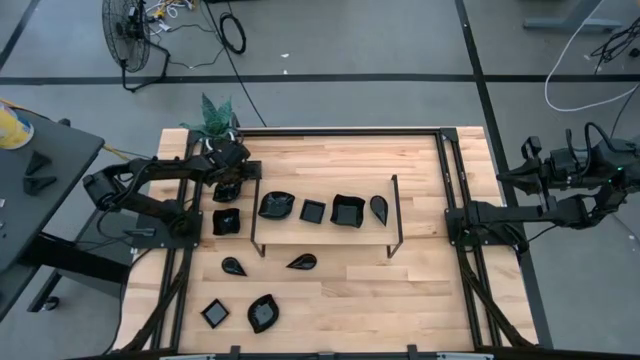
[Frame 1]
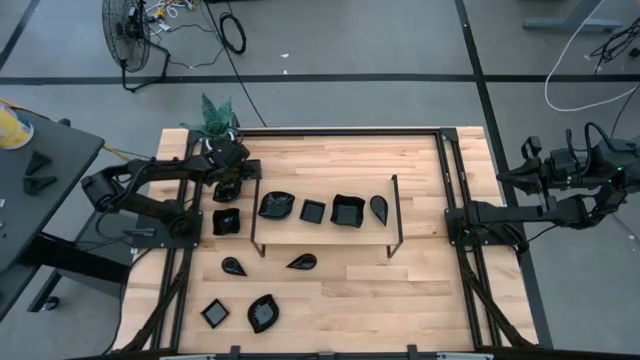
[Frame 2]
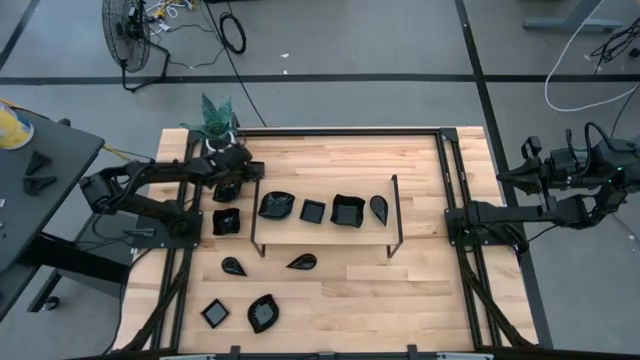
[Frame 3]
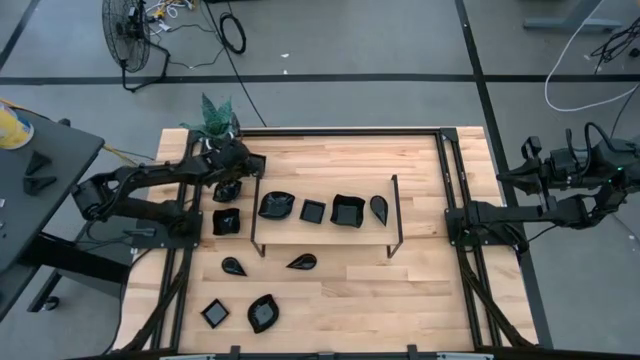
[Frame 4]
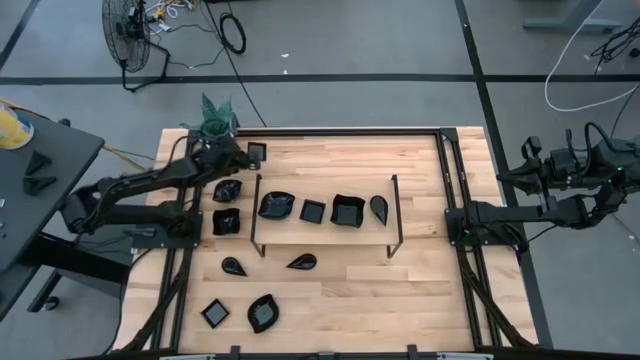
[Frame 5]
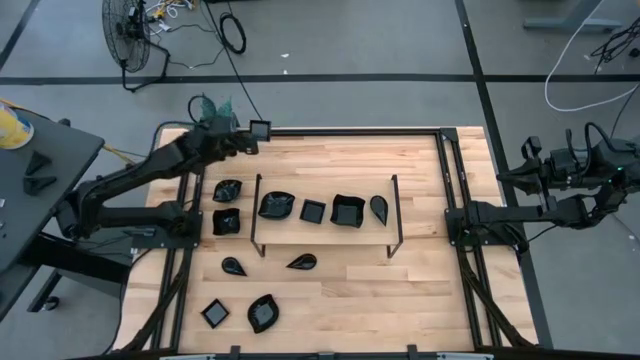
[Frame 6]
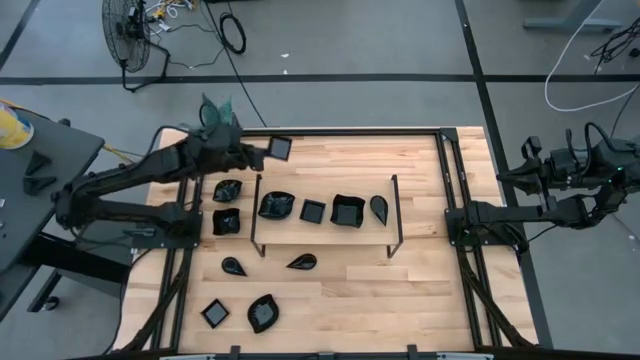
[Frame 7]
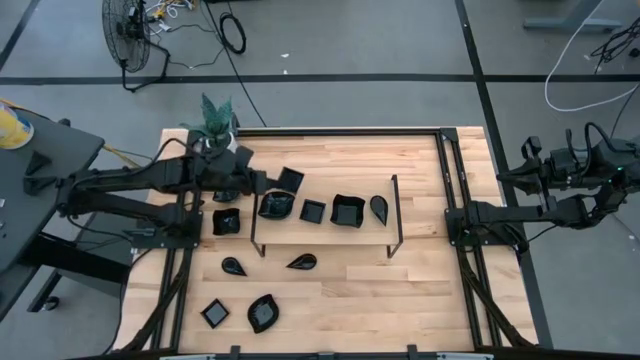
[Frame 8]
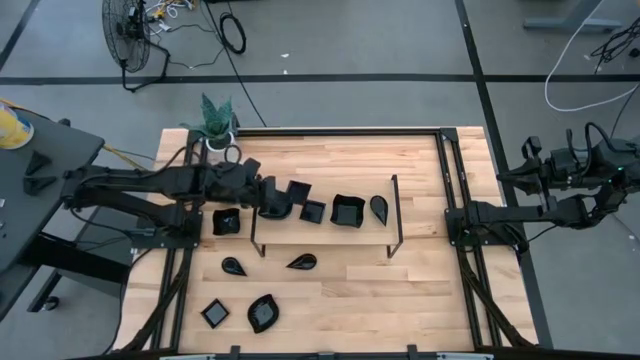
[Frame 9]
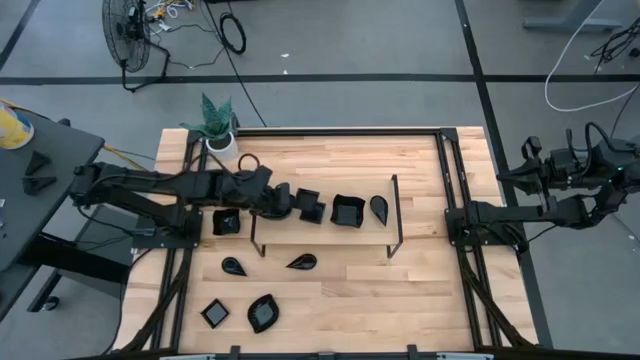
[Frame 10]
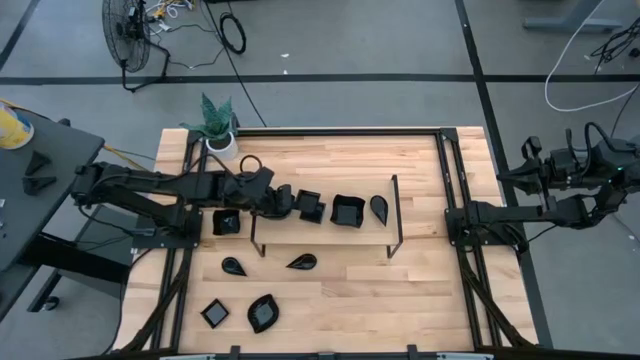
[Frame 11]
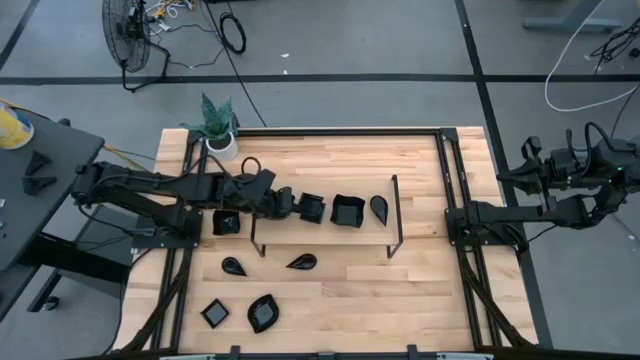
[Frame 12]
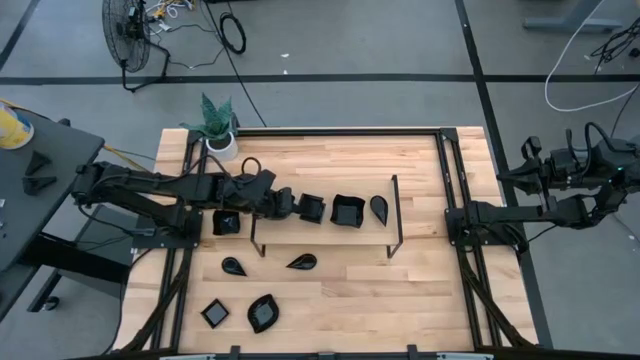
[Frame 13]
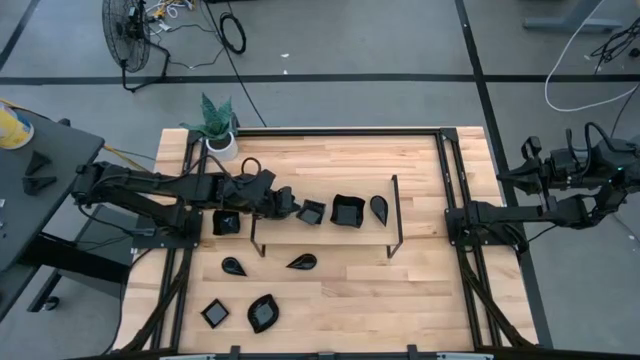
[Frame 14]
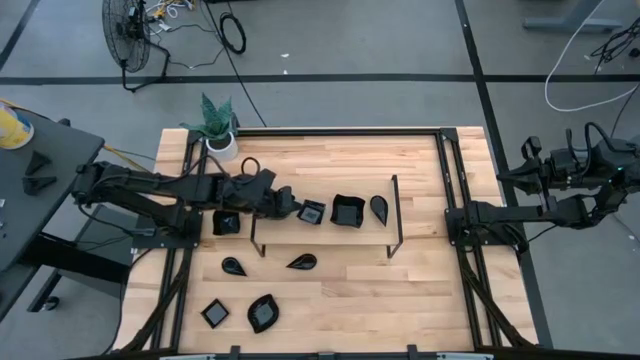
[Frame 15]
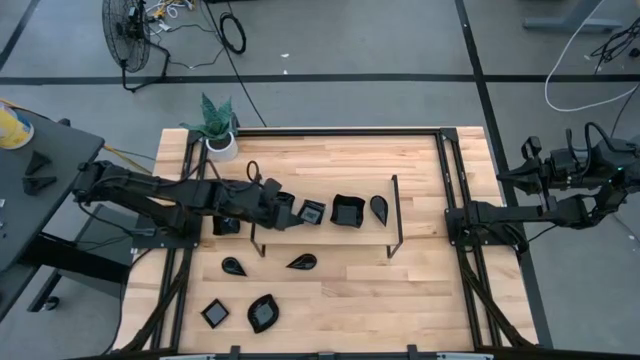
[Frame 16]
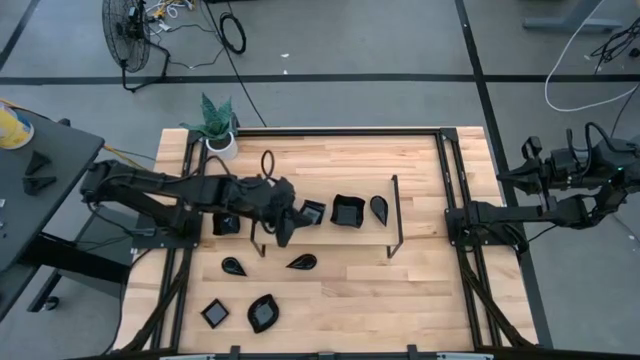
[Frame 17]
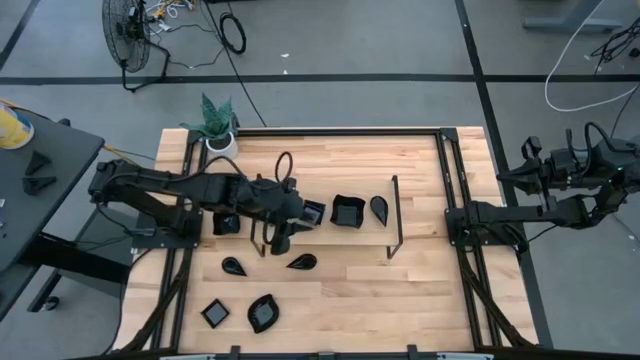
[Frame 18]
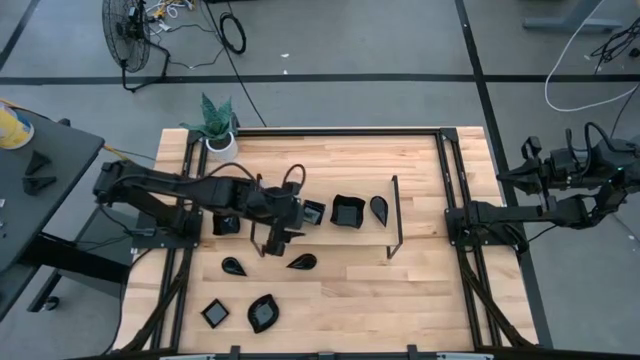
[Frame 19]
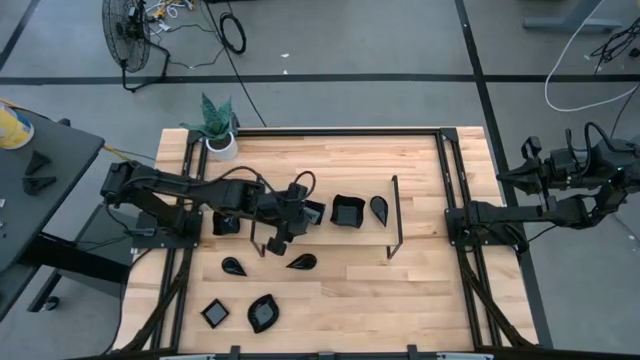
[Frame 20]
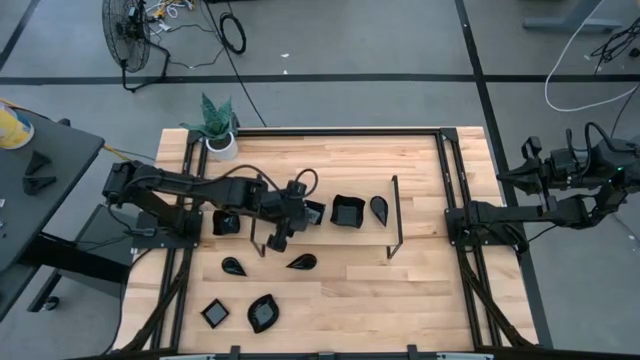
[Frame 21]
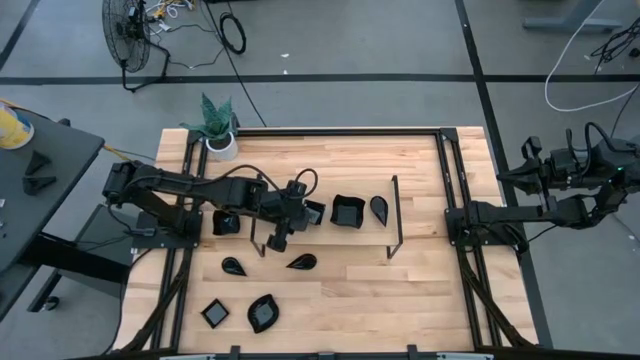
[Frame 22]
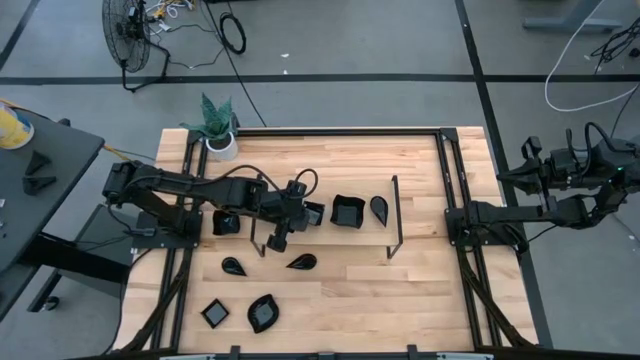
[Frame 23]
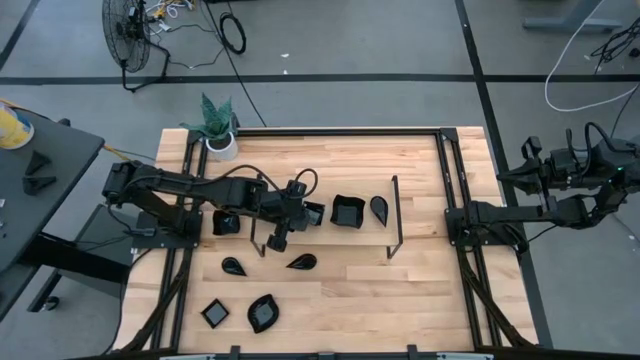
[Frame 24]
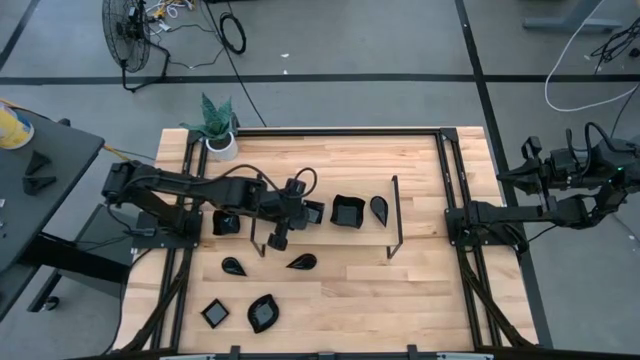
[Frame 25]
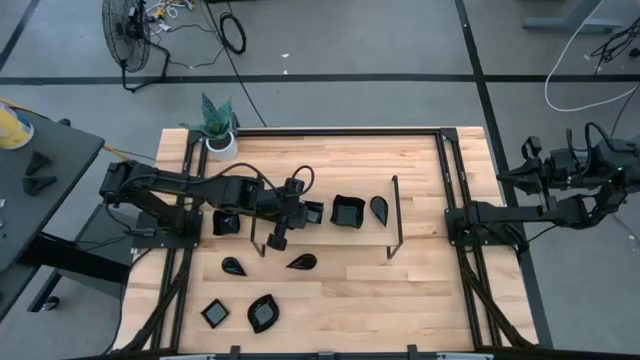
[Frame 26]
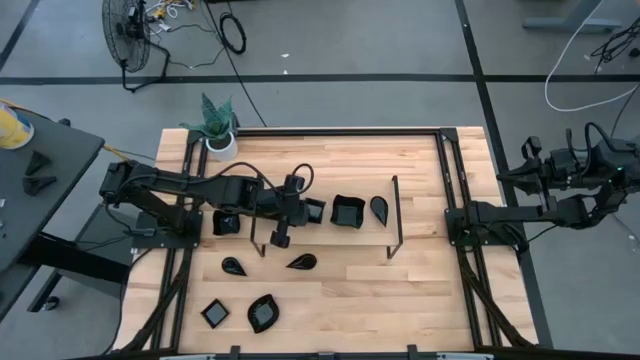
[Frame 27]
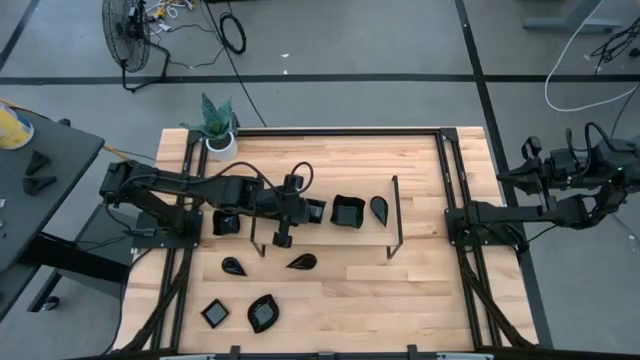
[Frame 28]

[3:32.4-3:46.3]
Task: Pick & Place Mini shaped plates
Stack the square plate on top of the square plate on the shelf

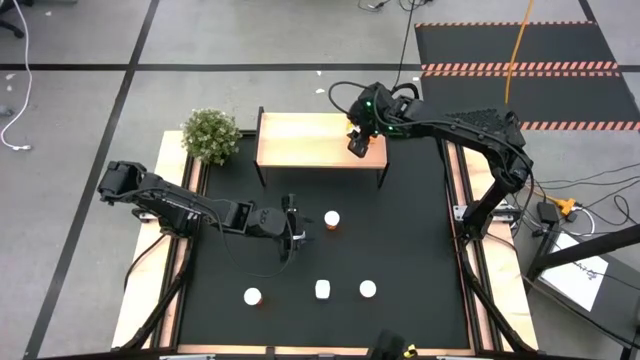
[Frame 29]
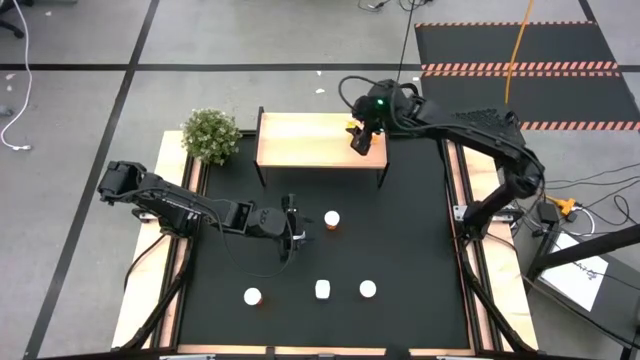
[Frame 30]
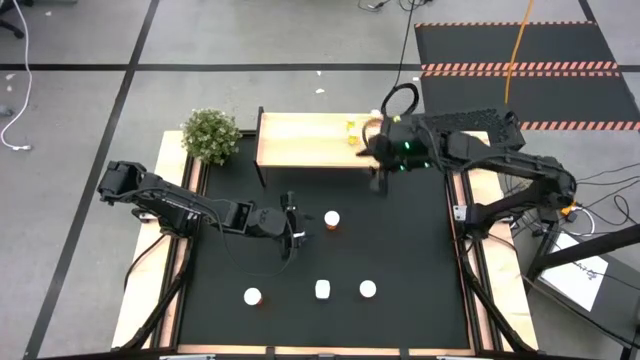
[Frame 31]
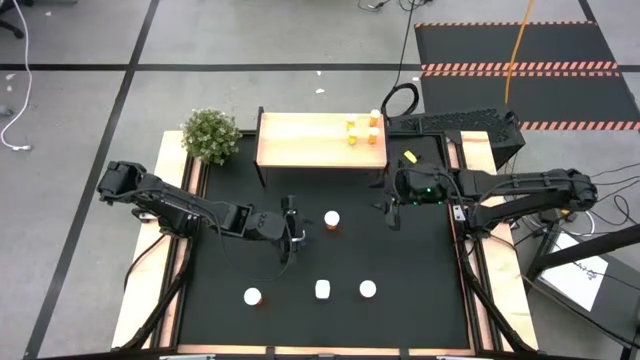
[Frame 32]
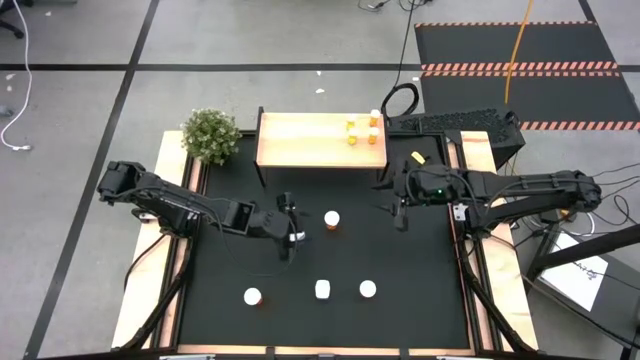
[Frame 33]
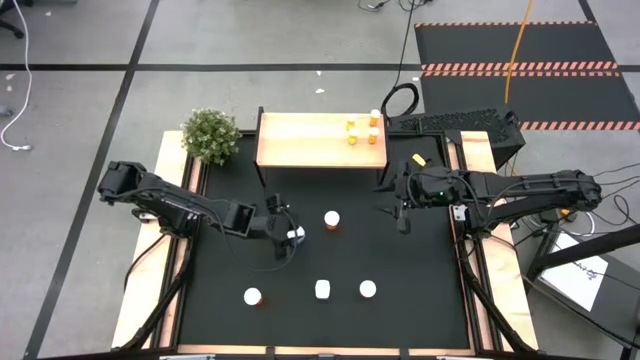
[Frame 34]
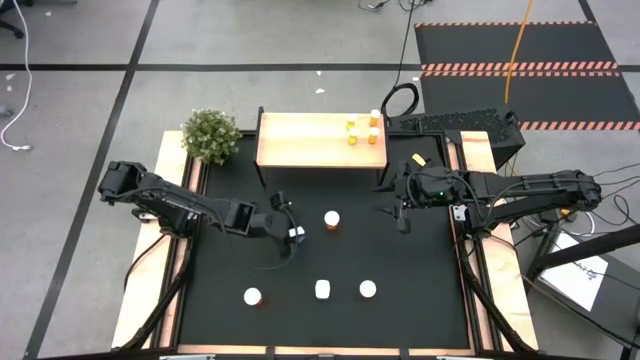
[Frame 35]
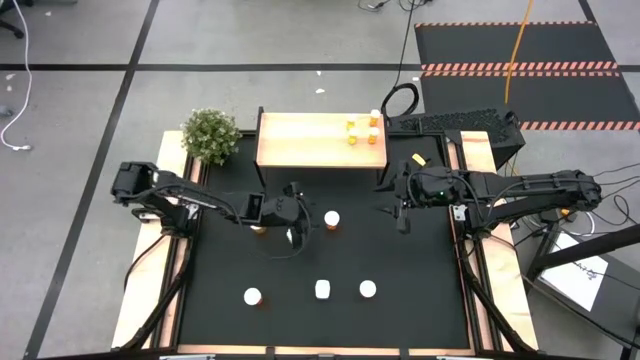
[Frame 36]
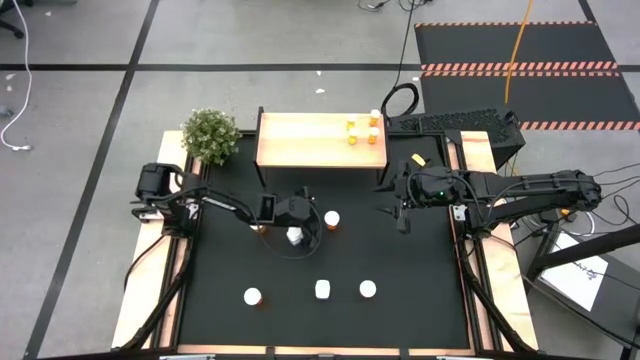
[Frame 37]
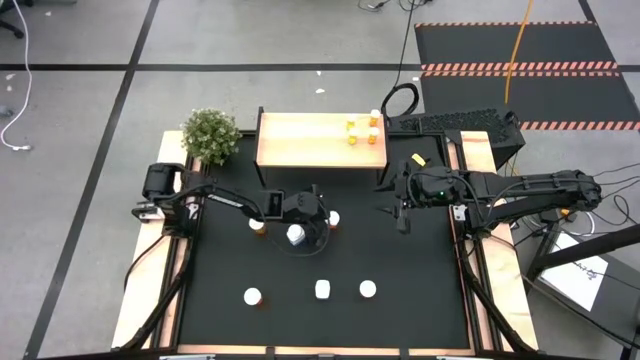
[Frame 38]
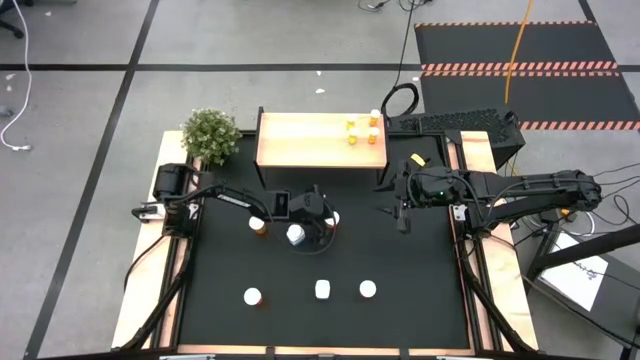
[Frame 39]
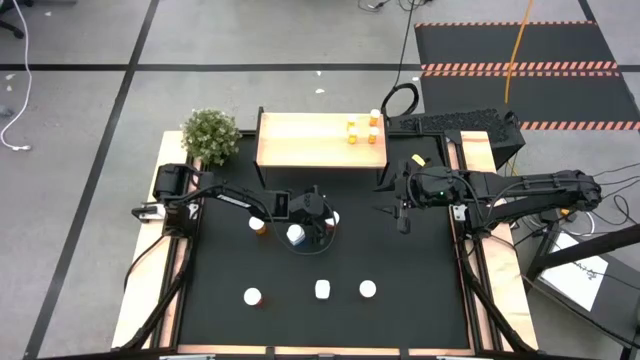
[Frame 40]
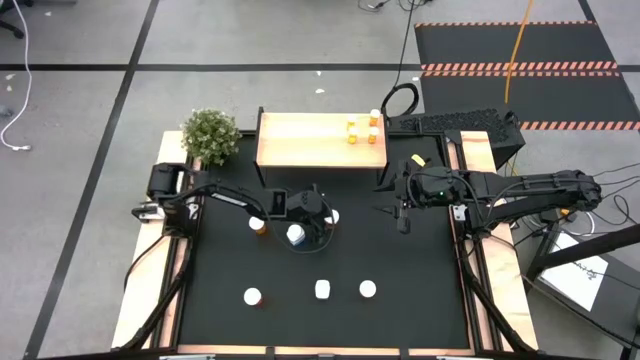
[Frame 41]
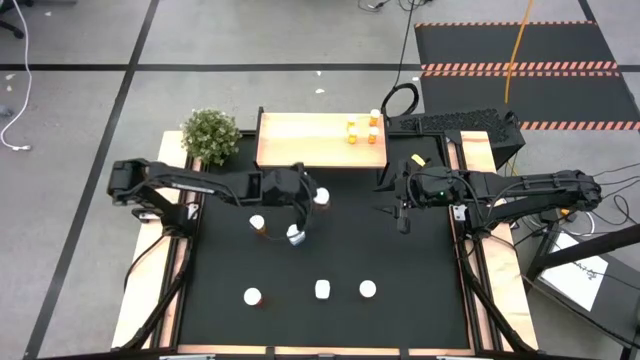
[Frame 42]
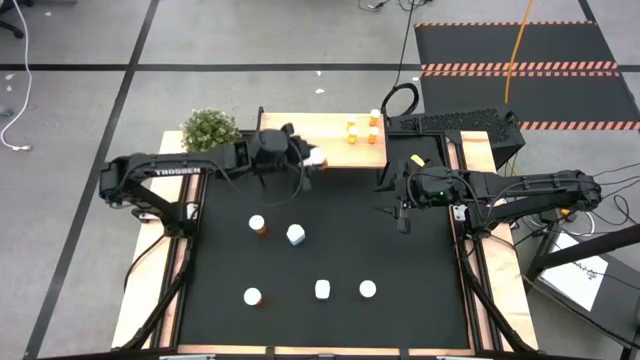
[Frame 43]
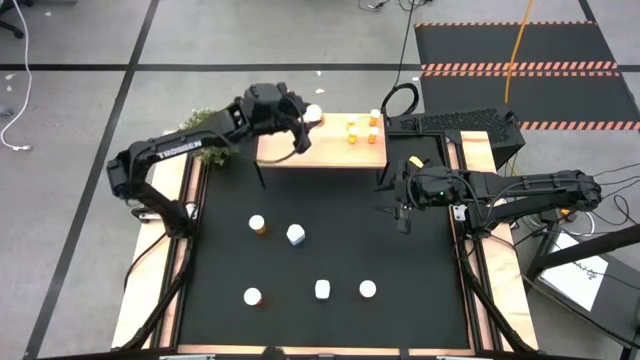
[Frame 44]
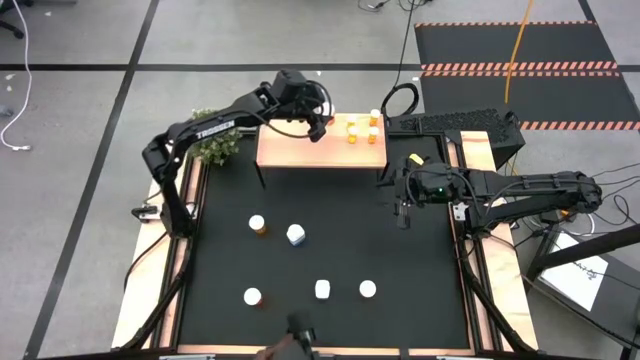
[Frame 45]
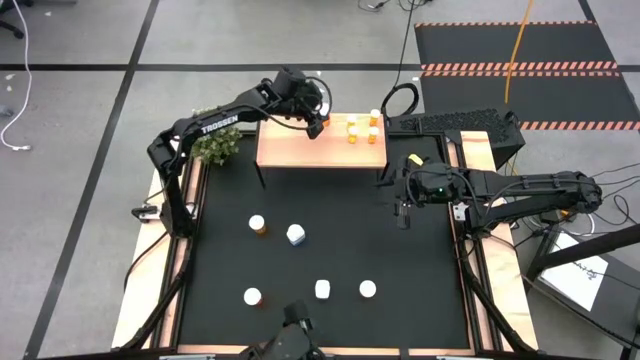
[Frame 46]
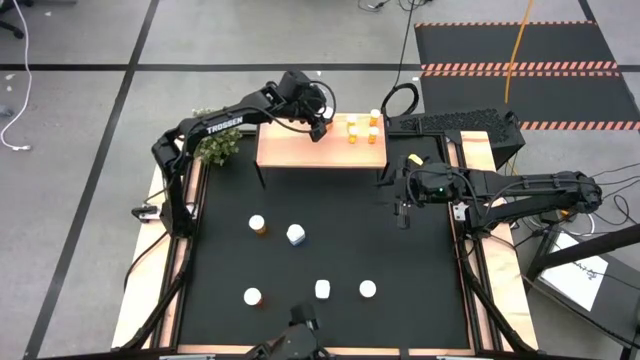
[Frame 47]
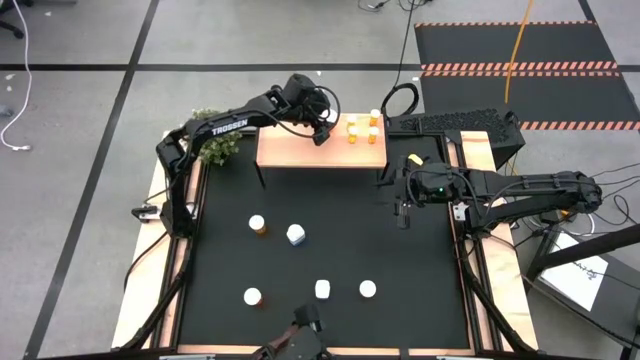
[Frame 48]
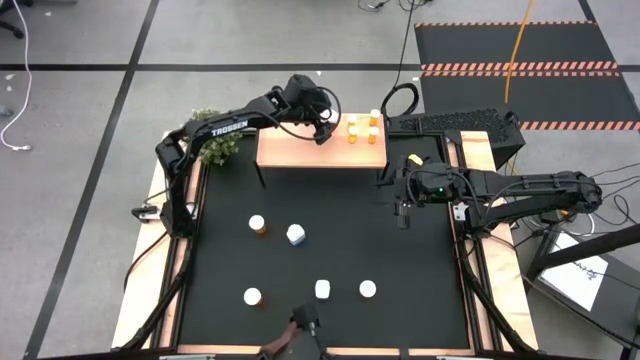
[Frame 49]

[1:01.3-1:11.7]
Task: Pick and place medicine bottles onto shelf by color
Put the large orange pill bottle on the shelf
